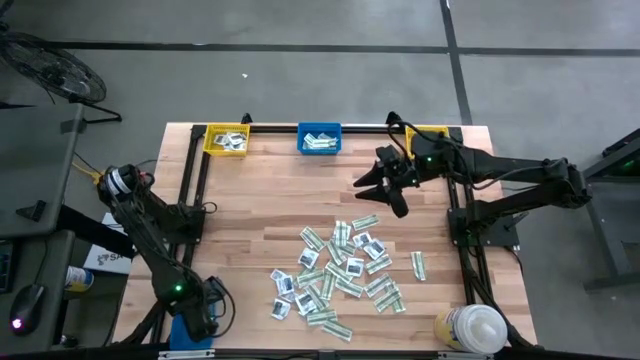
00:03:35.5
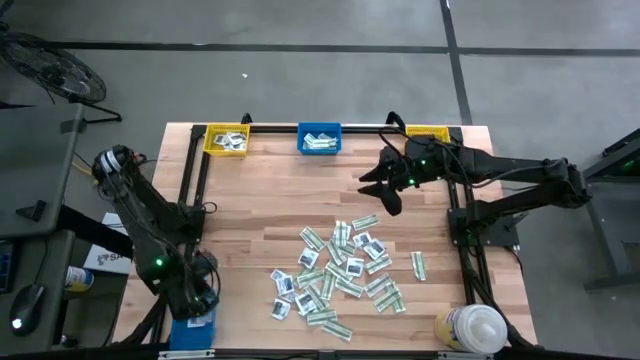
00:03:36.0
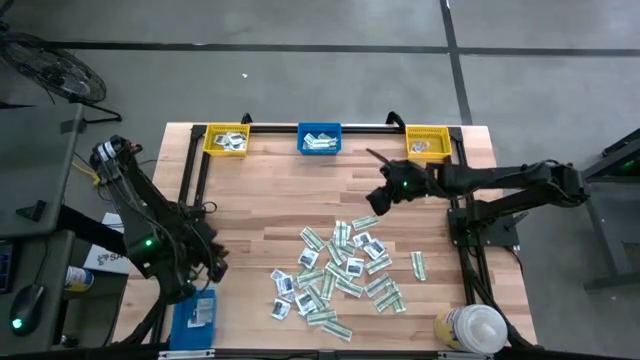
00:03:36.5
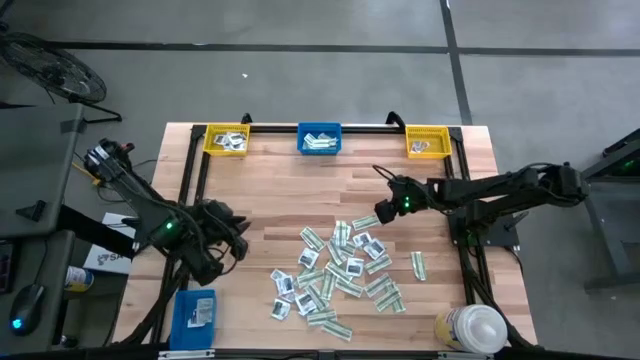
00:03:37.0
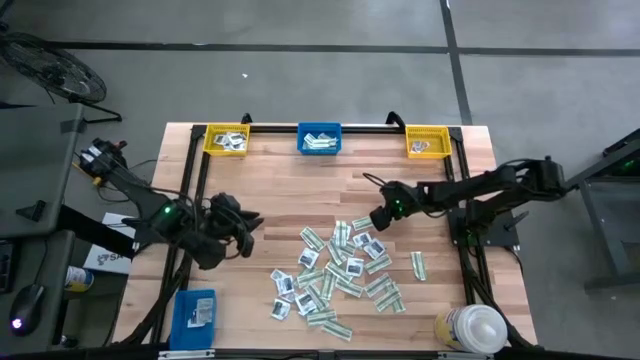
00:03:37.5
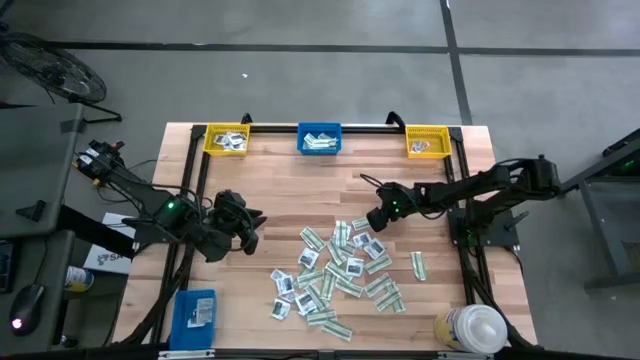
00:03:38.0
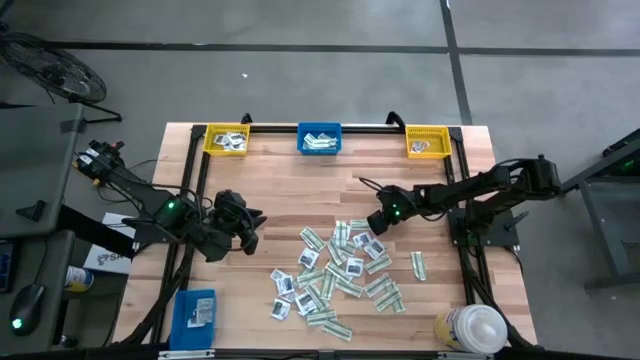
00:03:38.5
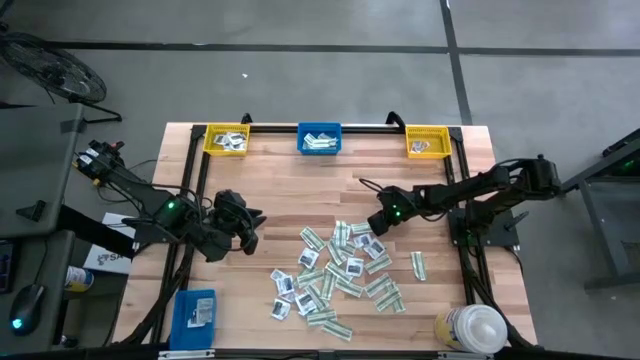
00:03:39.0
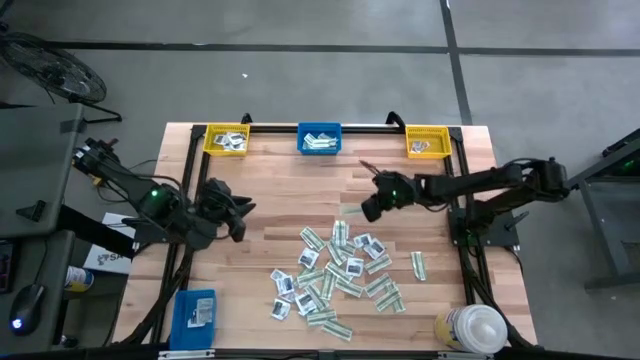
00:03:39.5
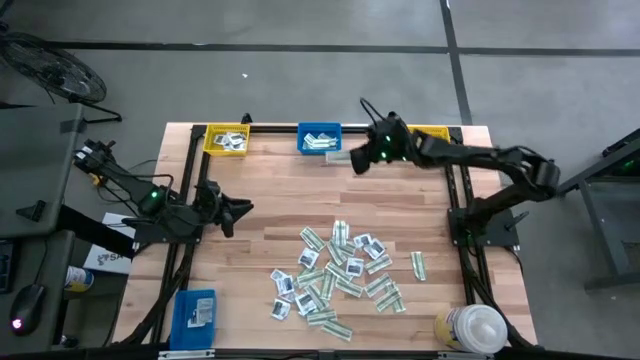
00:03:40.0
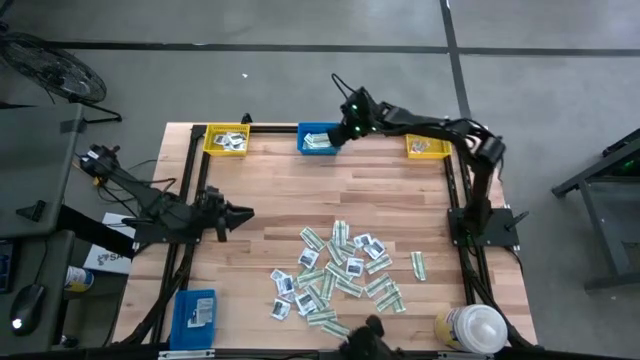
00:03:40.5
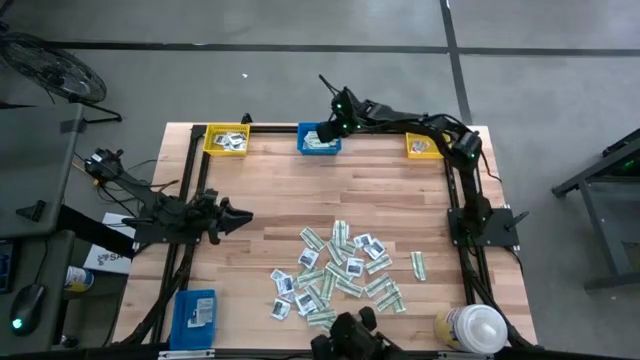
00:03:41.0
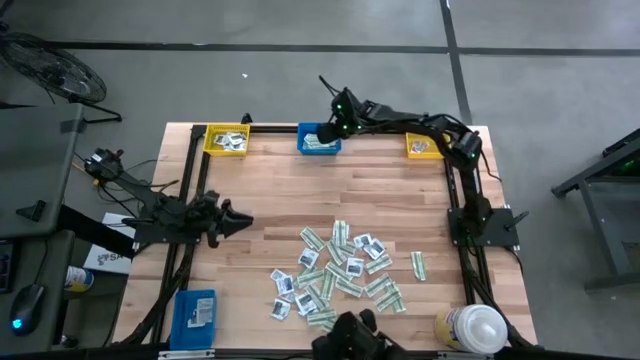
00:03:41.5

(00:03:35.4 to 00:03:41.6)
Task: Pick & Place First Aid Supplies
Put the green bandage pack into the top blue bin

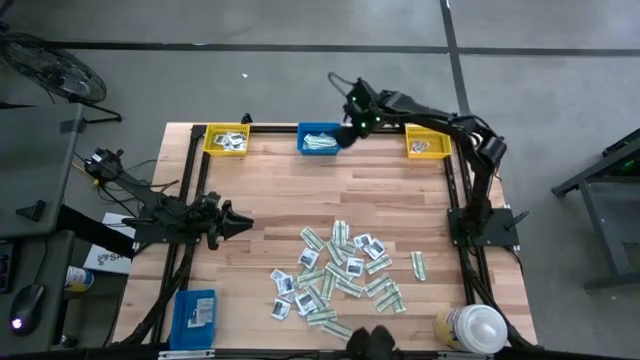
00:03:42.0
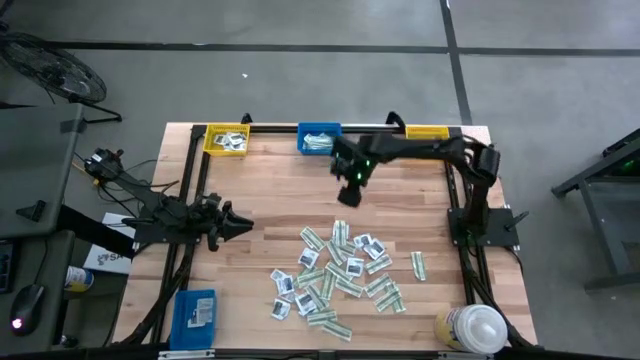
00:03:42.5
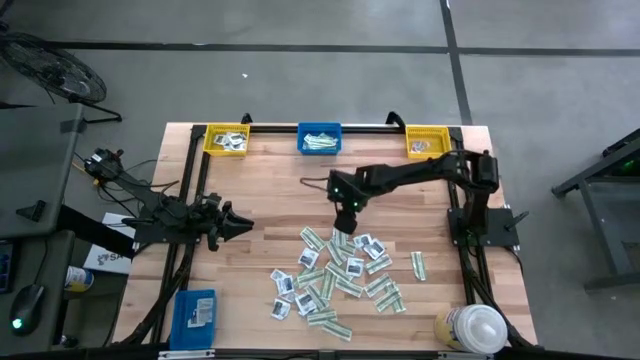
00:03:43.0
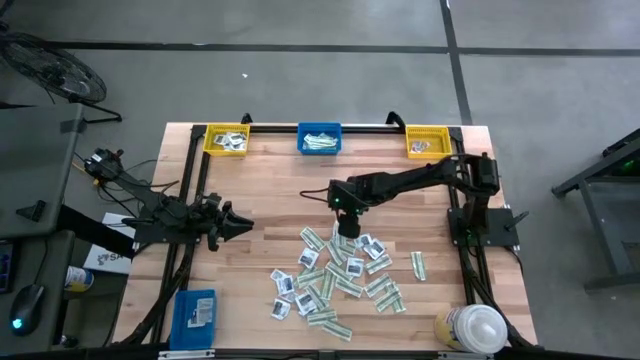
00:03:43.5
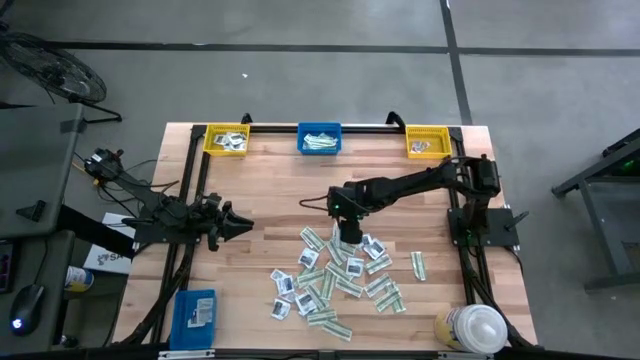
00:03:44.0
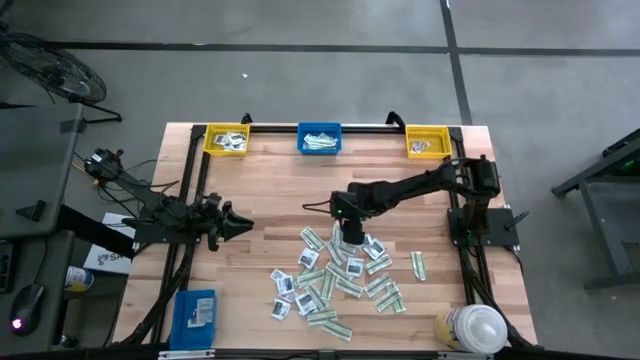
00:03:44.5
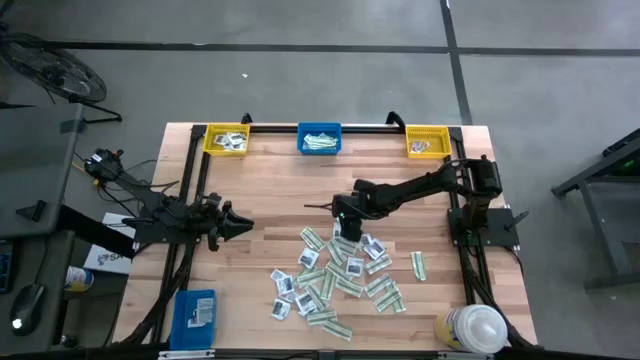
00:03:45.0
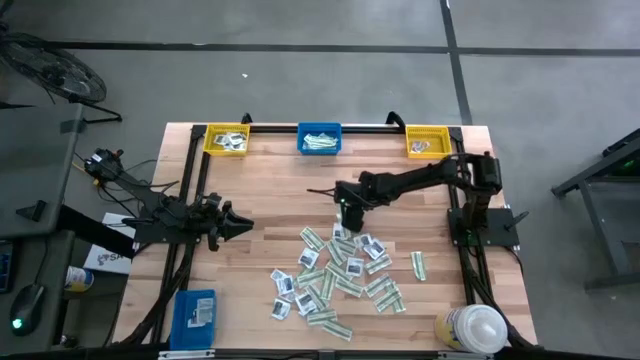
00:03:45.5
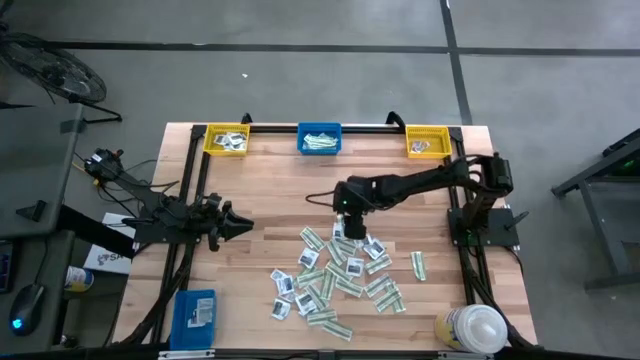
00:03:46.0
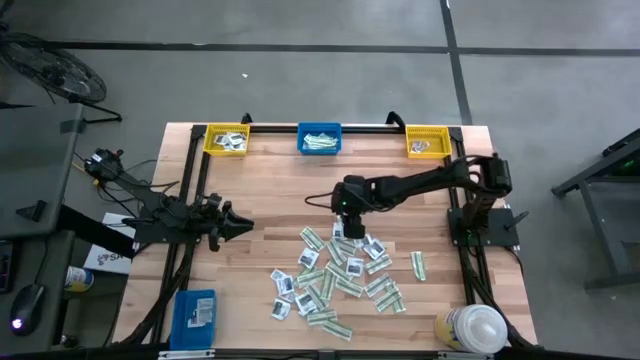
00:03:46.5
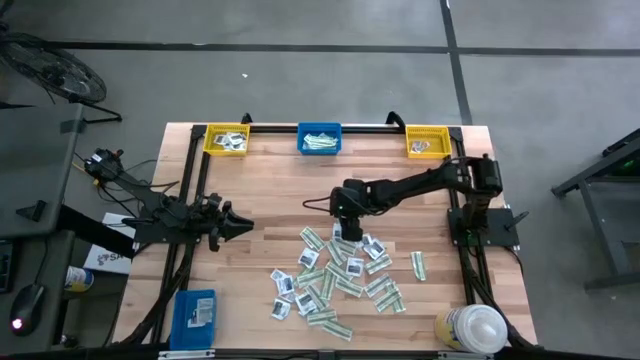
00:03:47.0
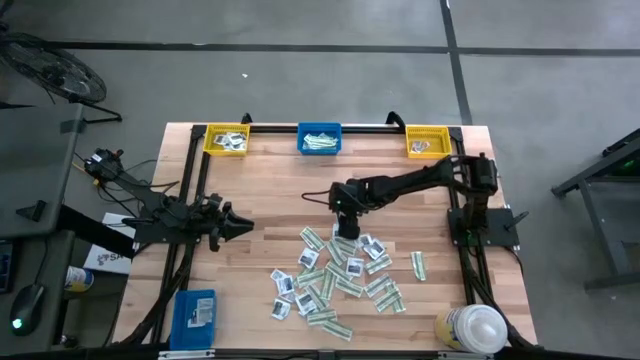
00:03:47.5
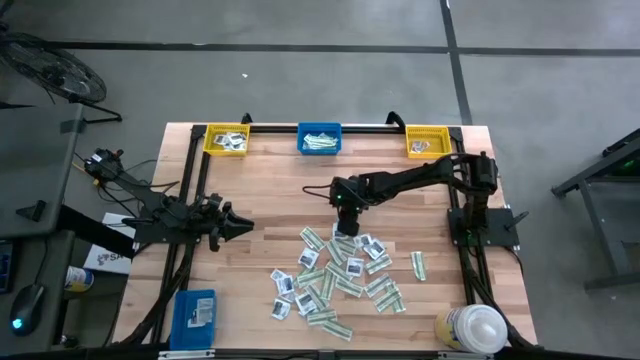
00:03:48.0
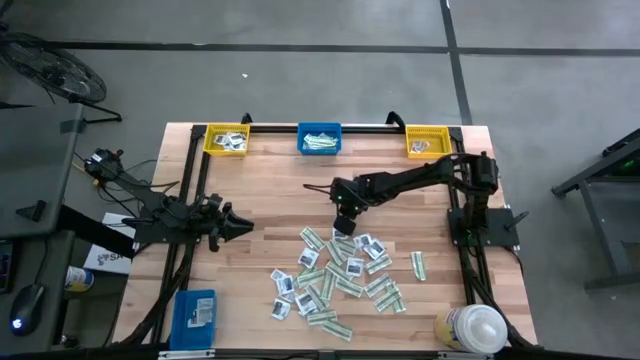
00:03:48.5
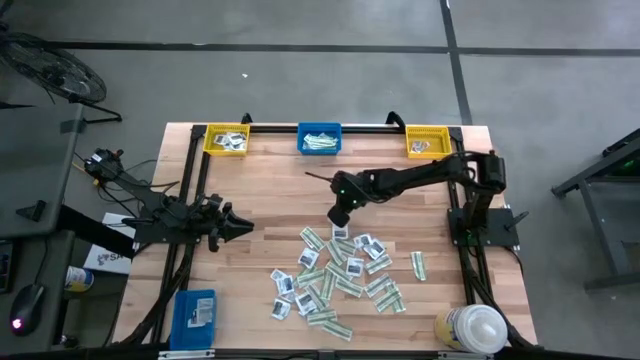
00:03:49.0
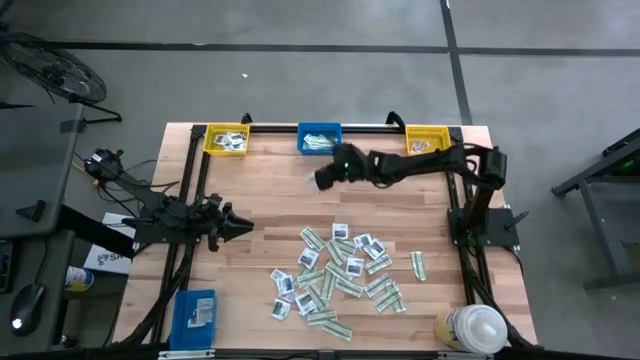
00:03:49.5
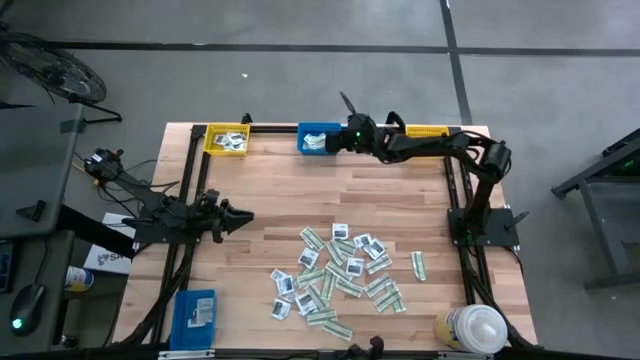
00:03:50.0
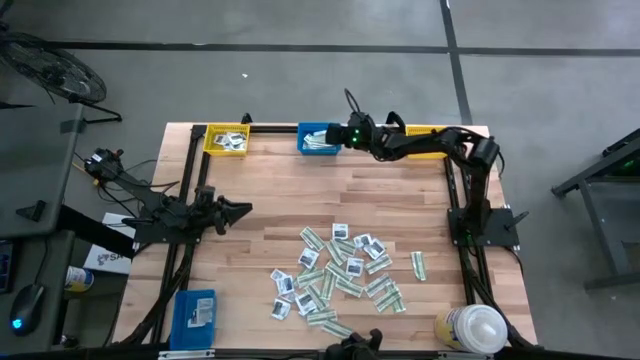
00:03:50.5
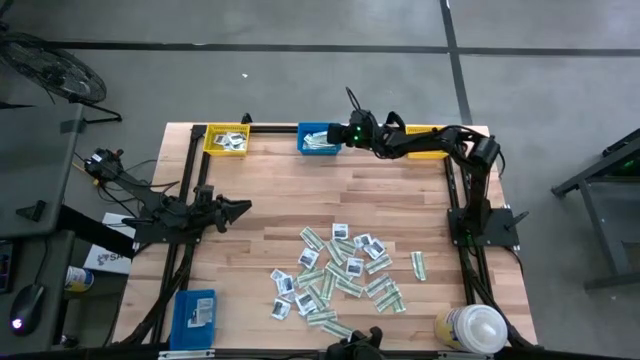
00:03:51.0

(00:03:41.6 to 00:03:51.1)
Put the green bandage pack into the top blue bin

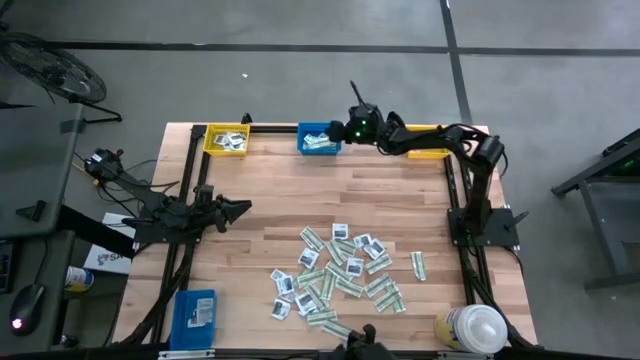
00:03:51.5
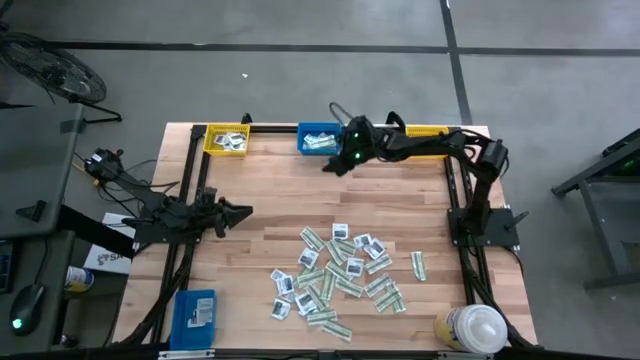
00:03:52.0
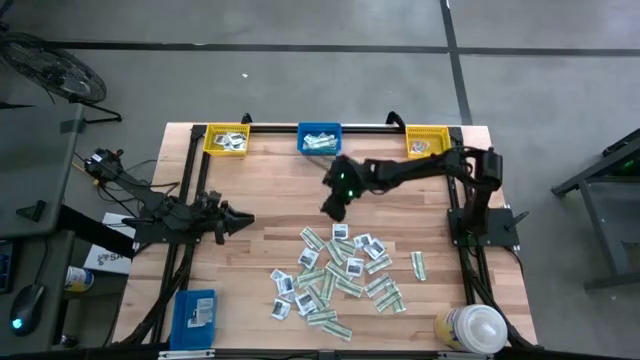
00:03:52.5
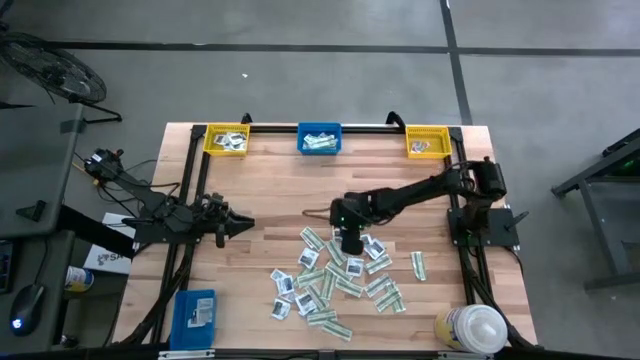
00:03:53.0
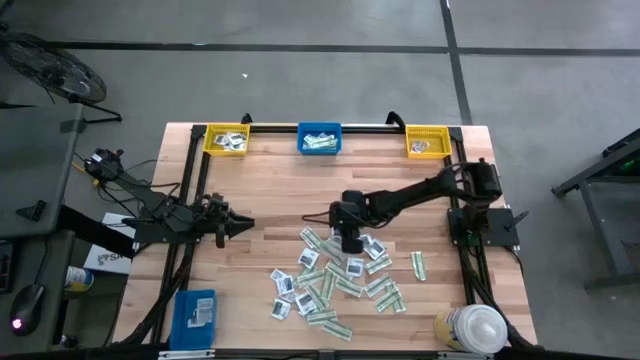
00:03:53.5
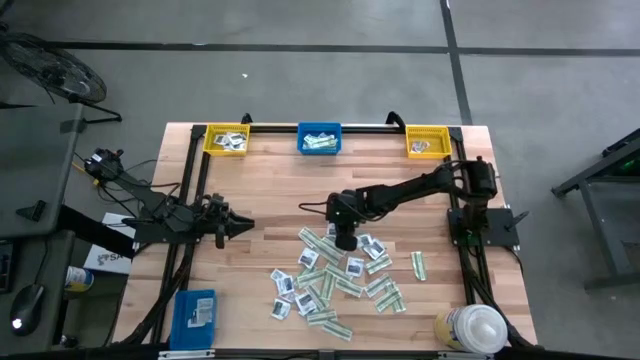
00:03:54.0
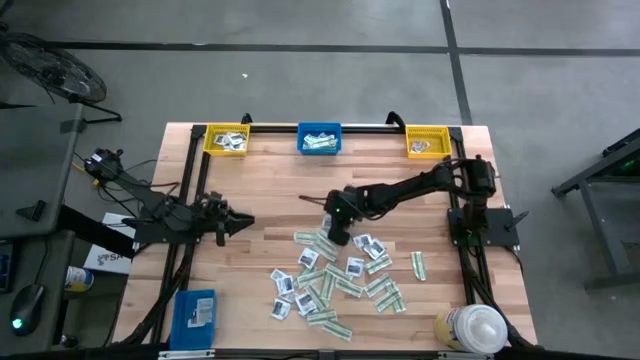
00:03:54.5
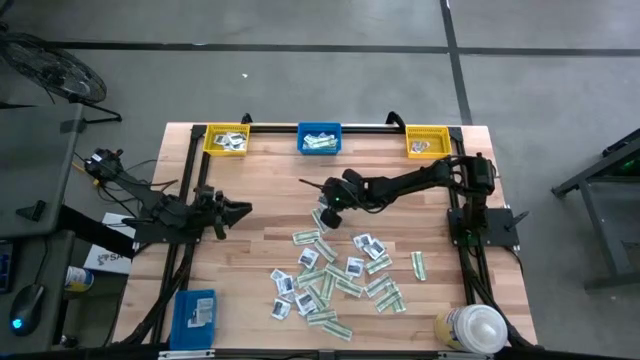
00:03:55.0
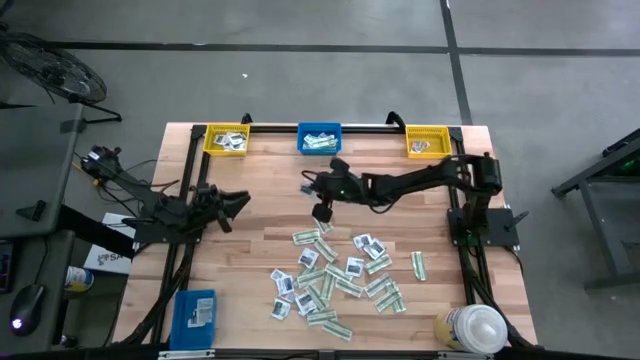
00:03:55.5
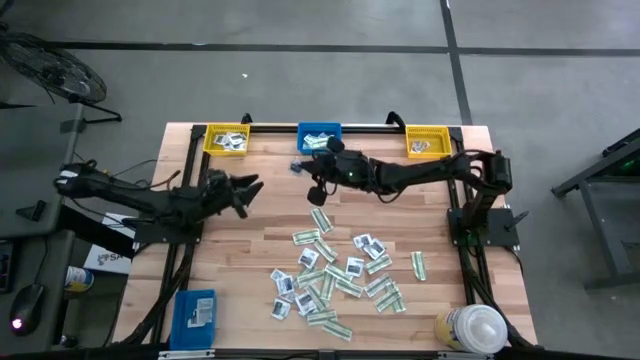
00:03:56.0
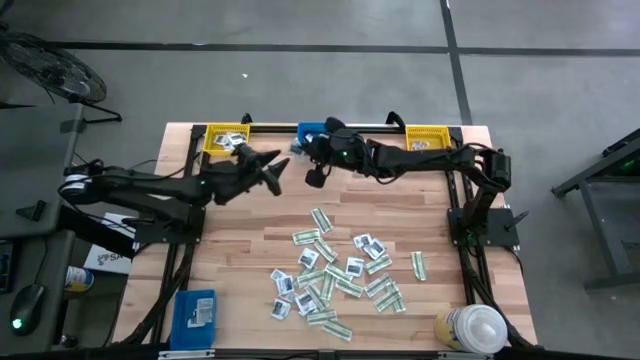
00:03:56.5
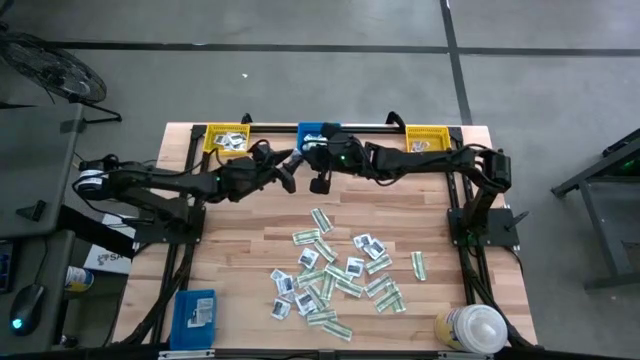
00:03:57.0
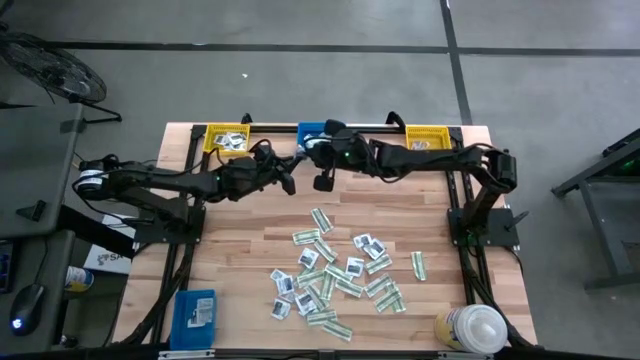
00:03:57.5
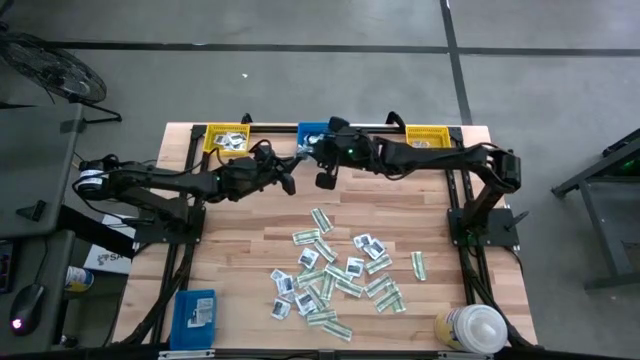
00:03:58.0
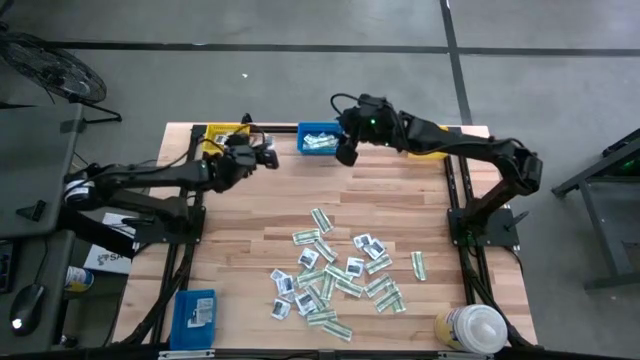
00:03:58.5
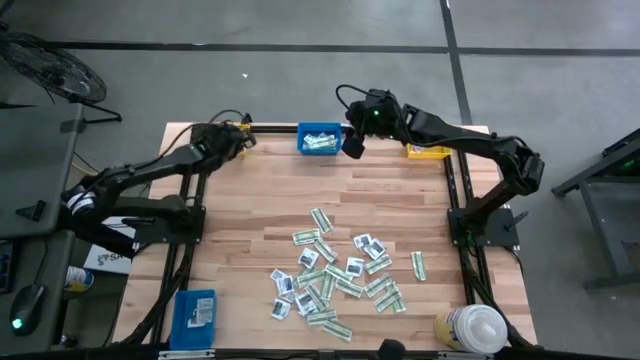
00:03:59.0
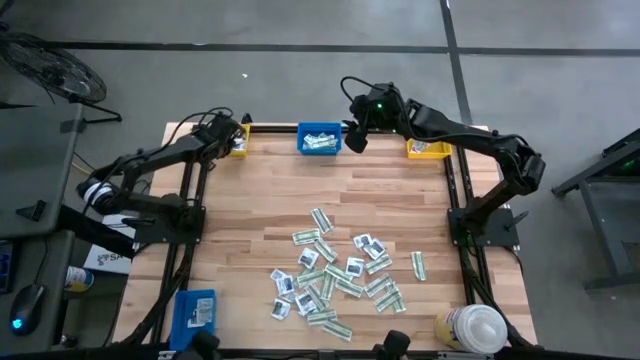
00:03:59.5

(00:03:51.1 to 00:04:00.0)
Put the gray towelette pack into the left yellow bin
